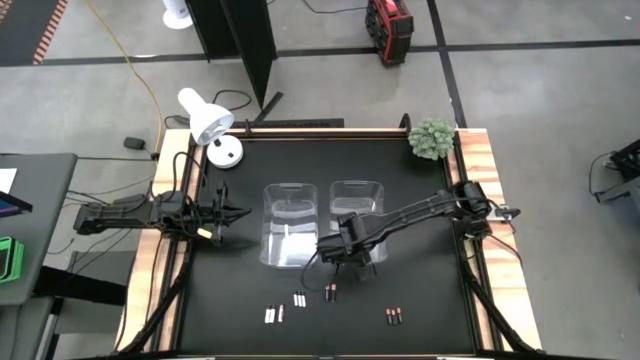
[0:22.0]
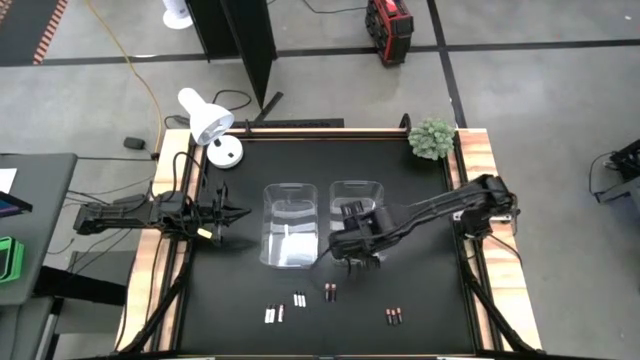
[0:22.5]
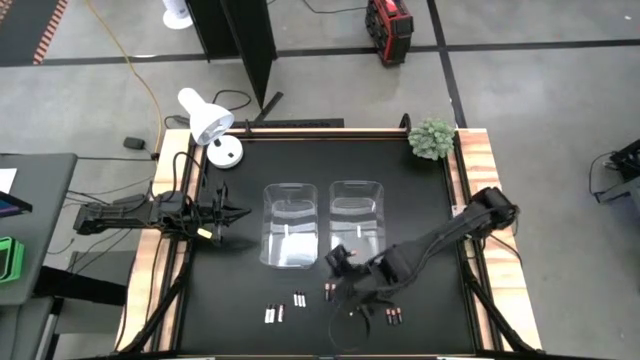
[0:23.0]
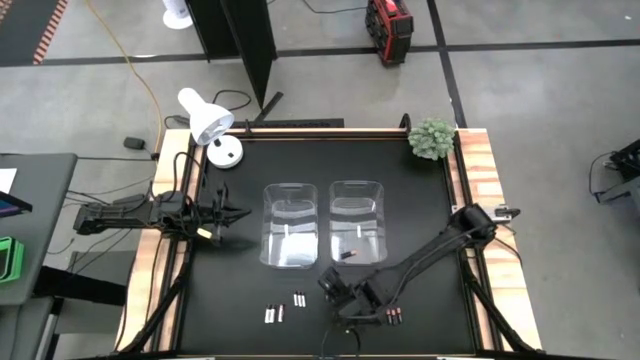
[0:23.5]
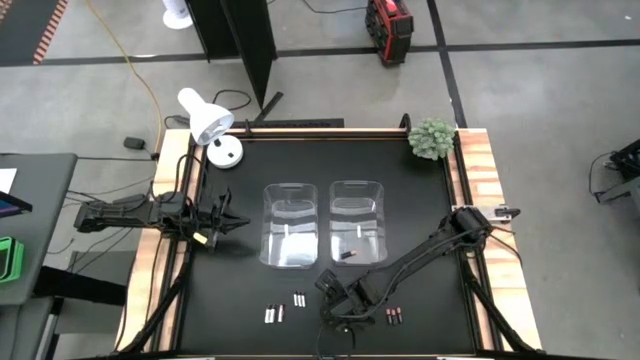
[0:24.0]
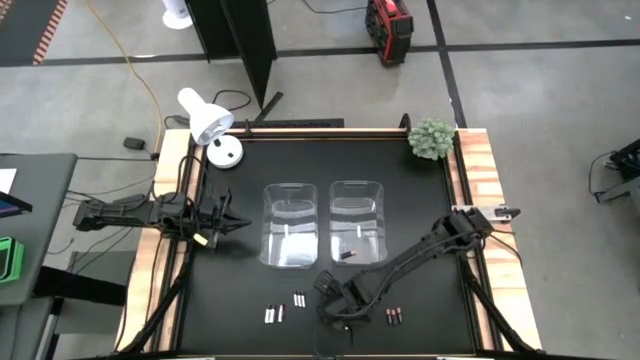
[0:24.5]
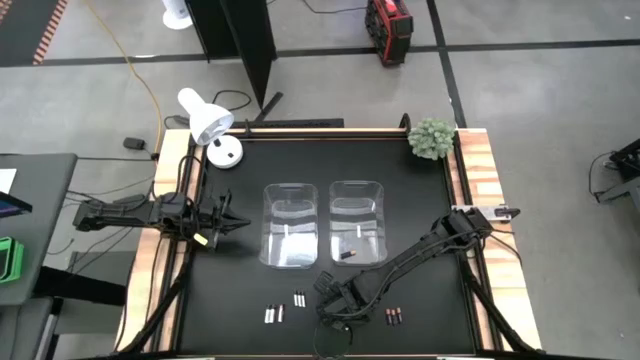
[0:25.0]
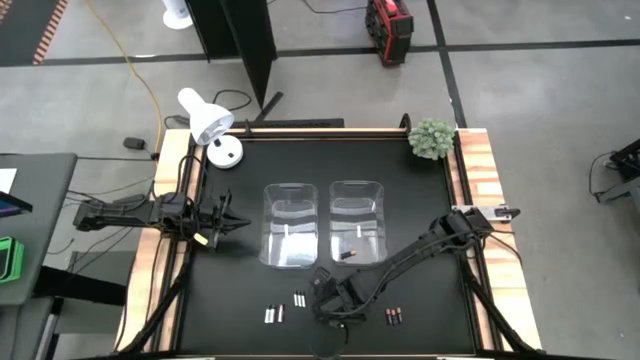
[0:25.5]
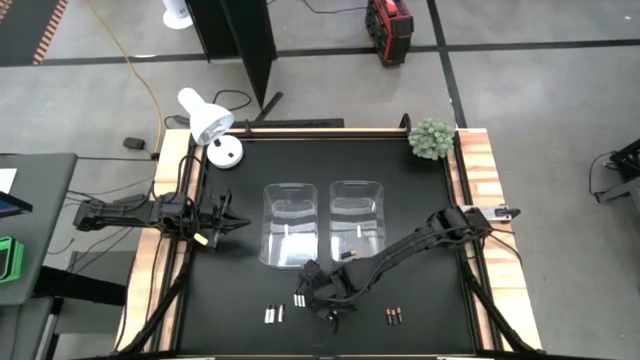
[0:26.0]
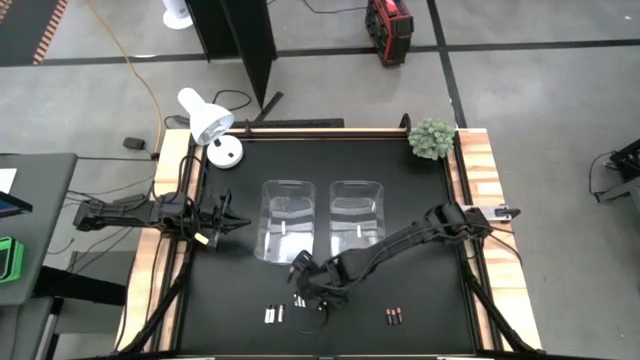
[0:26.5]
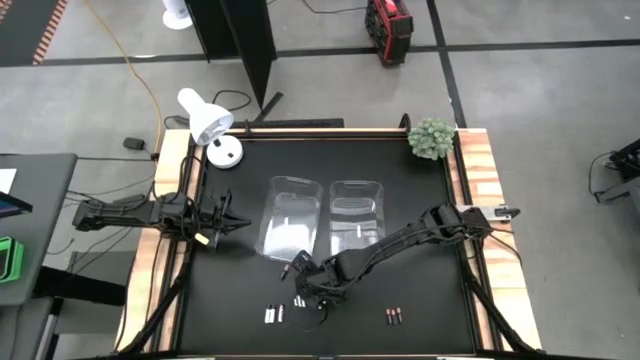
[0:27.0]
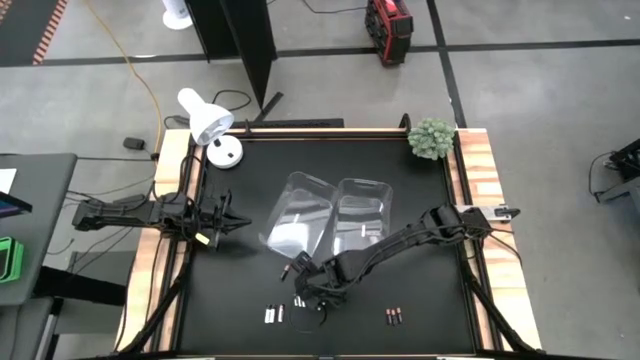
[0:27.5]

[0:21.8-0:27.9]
Task: Sort batteries
Put the black battery into the right transparent bin

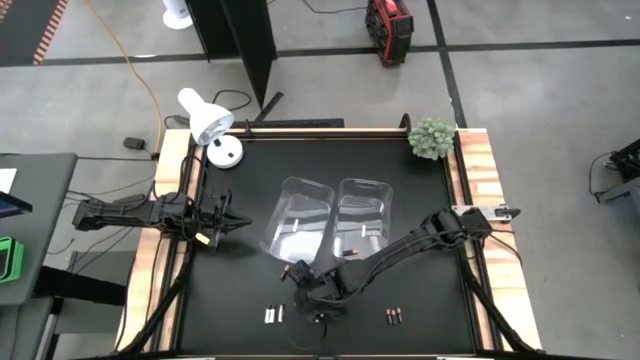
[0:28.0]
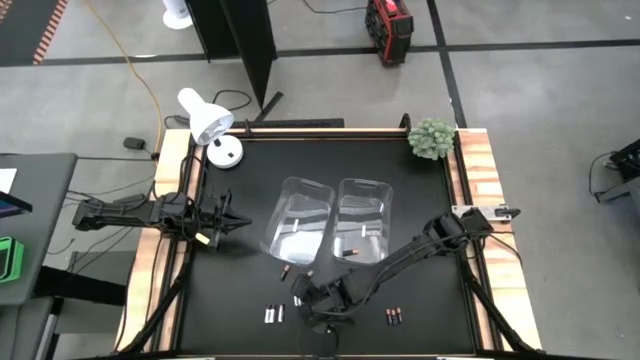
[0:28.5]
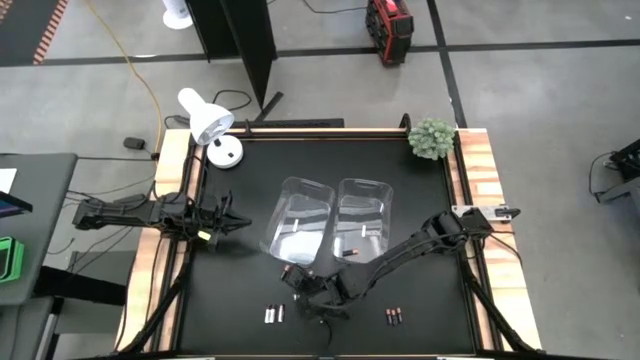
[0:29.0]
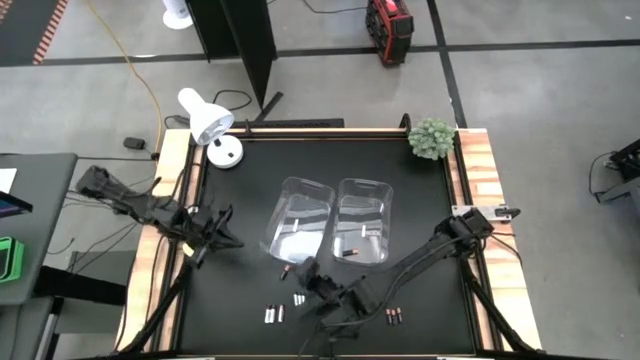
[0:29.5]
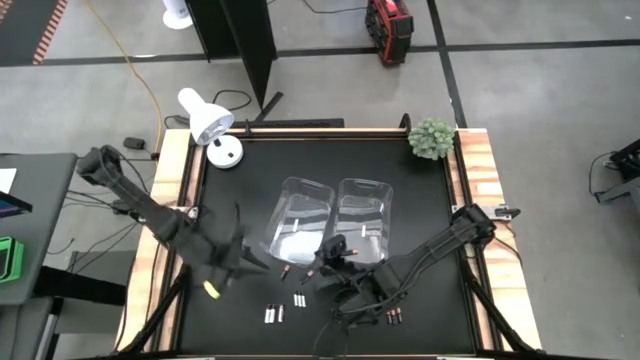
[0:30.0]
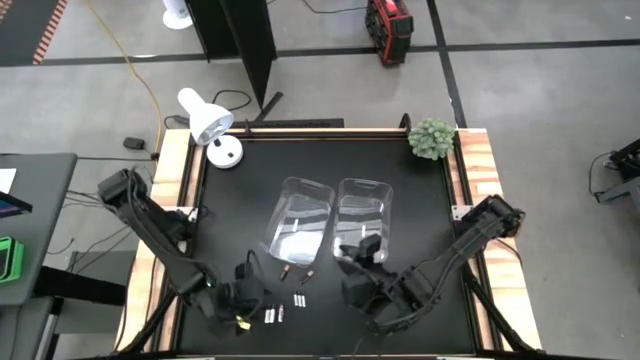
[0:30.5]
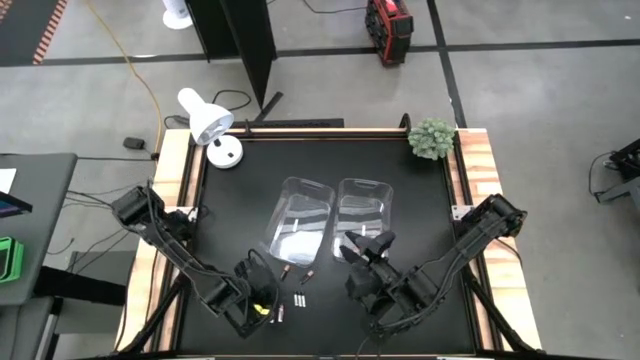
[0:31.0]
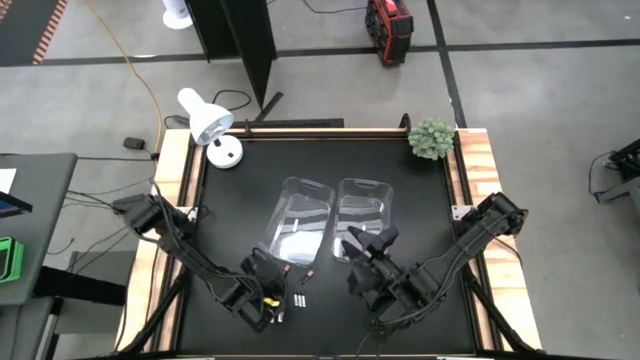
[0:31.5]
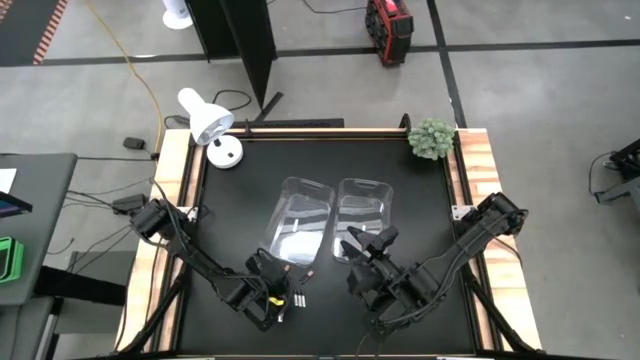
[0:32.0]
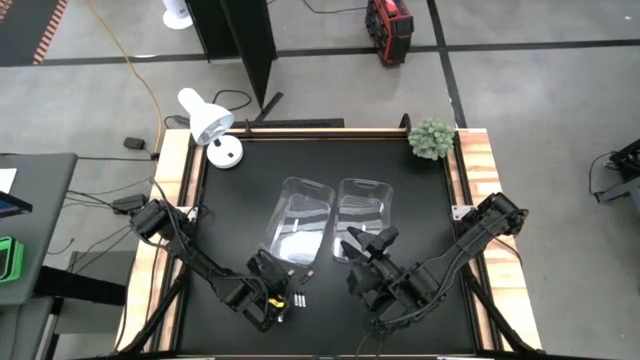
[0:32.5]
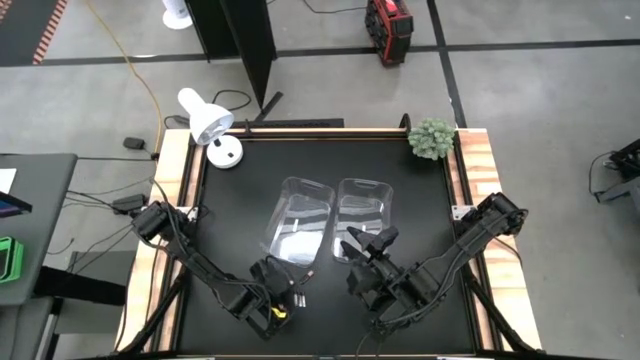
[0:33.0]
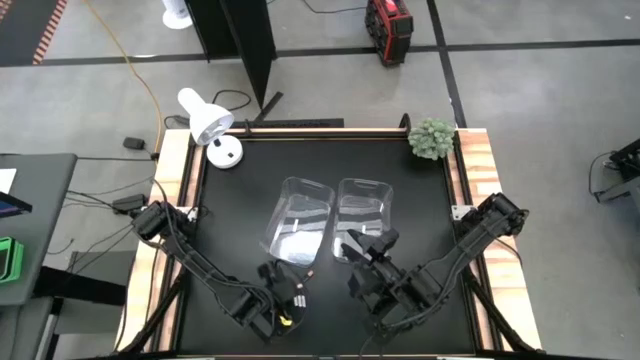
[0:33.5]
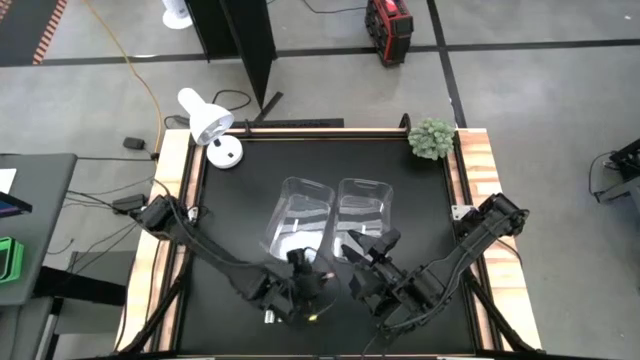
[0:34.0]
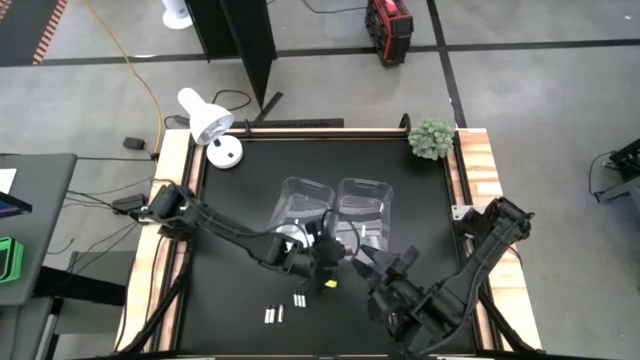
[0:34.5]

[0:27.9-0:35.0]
Put the black battery into the right transparent bin

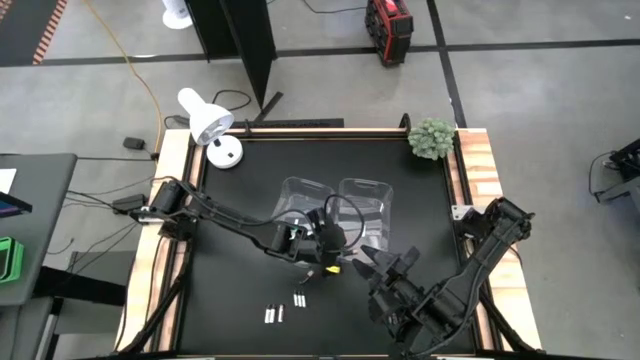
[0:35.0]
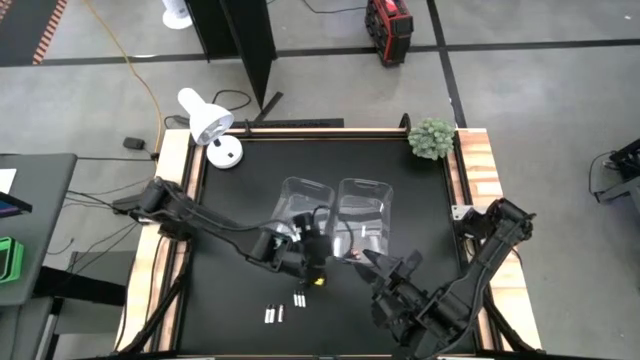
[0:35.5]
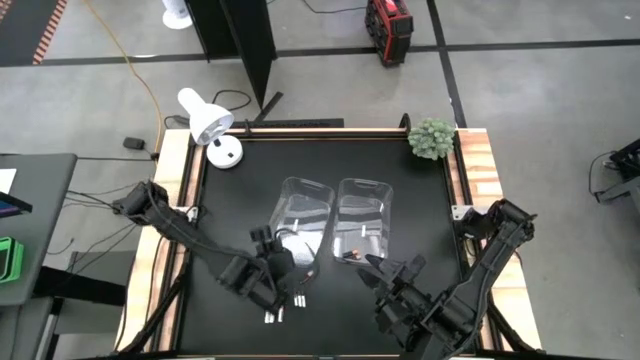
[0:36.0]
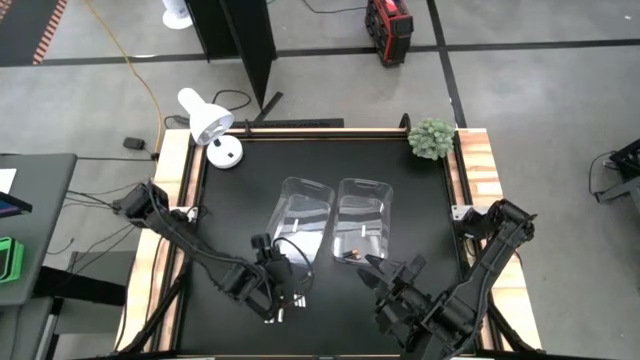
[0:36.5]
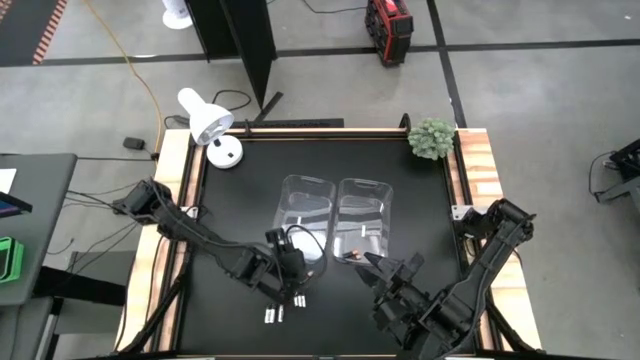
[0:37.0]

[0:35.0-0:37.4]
Adjust the left transparent bin on the table

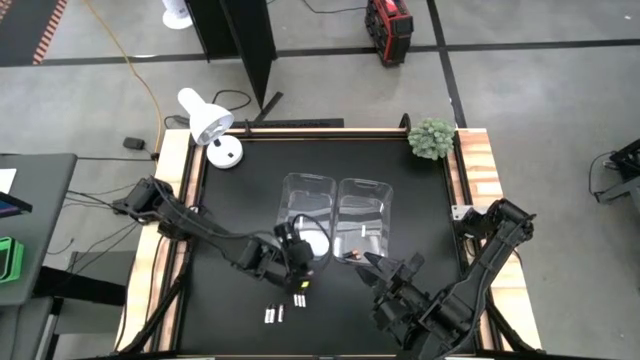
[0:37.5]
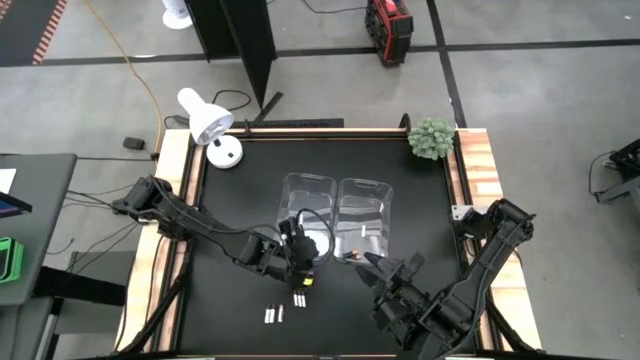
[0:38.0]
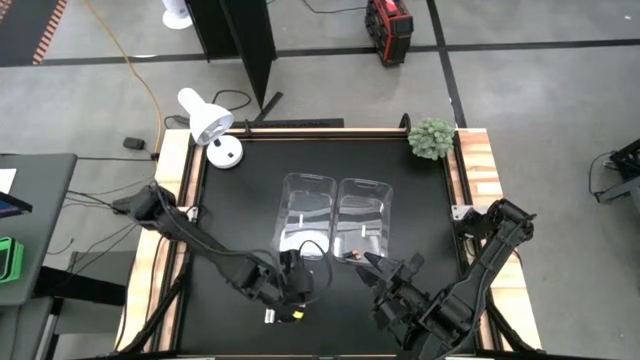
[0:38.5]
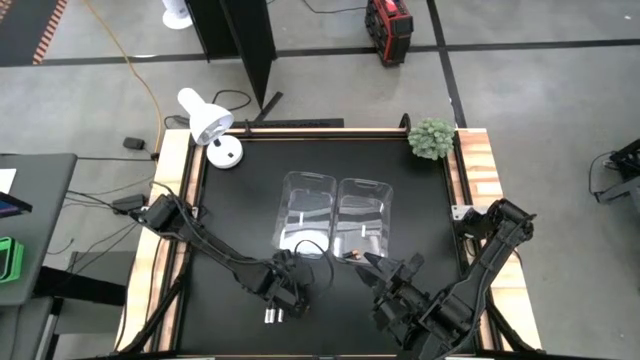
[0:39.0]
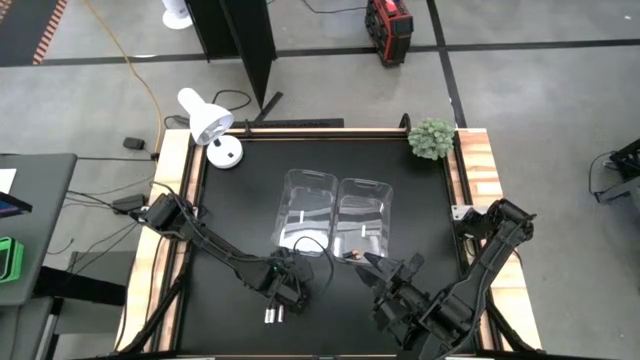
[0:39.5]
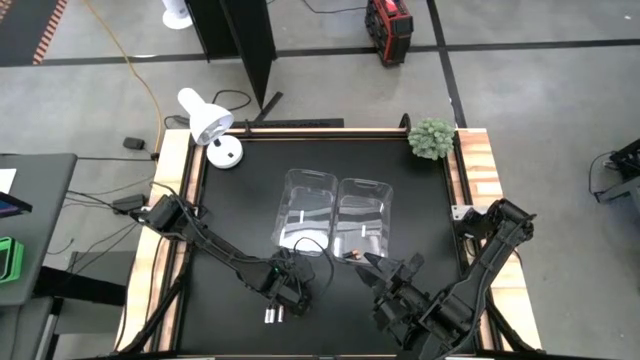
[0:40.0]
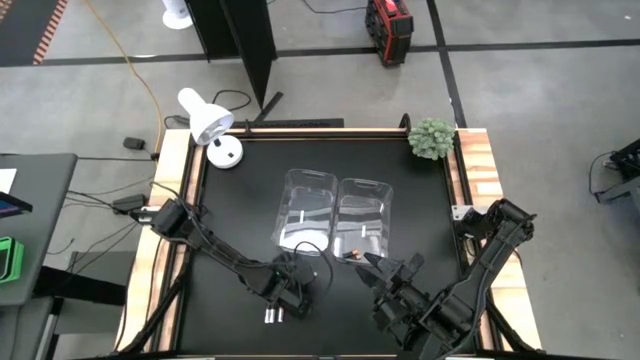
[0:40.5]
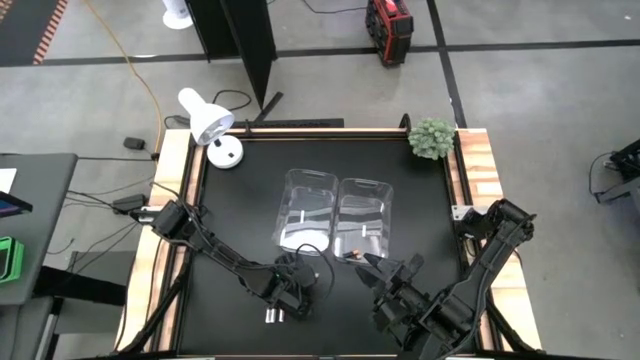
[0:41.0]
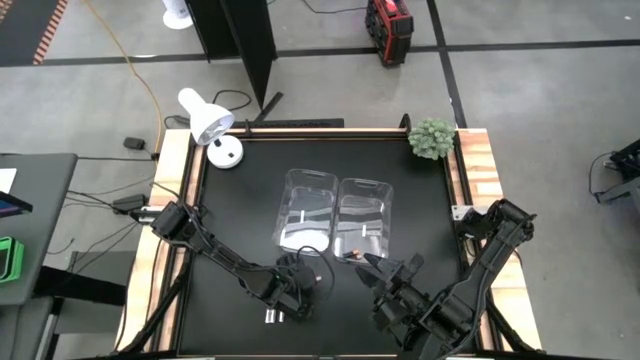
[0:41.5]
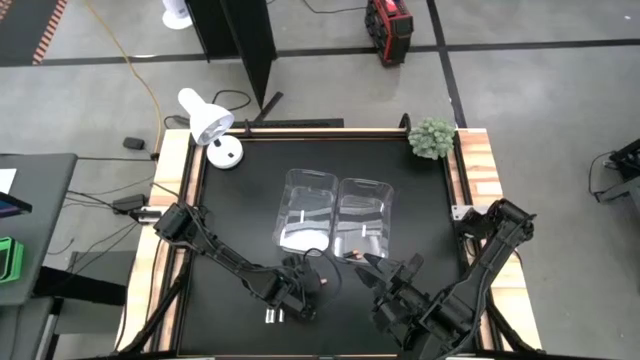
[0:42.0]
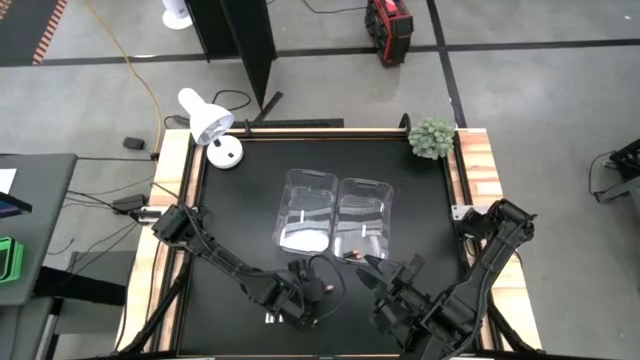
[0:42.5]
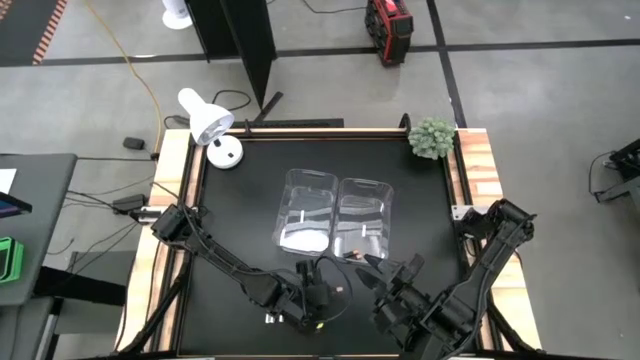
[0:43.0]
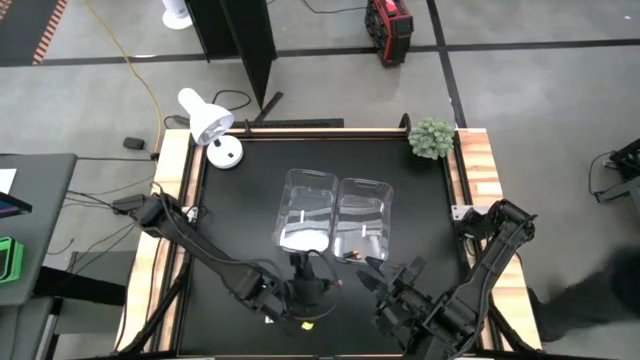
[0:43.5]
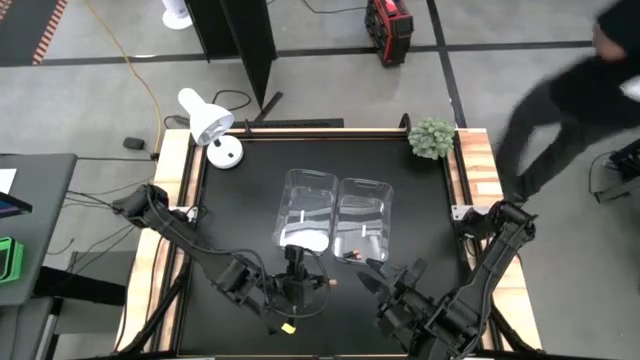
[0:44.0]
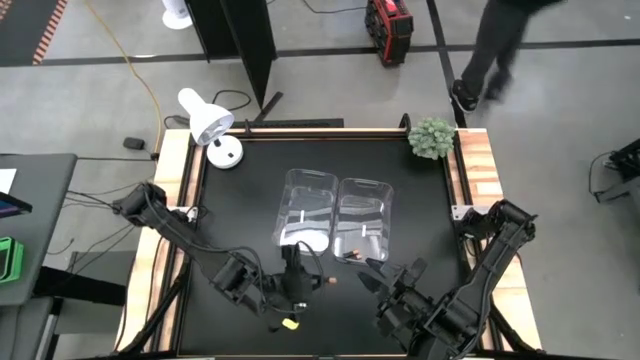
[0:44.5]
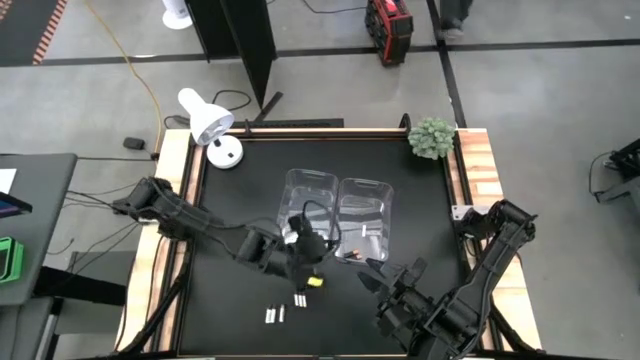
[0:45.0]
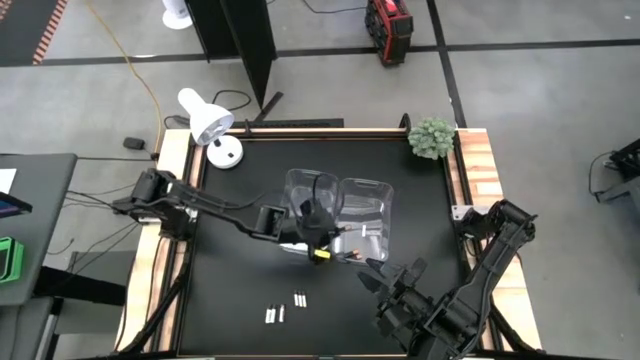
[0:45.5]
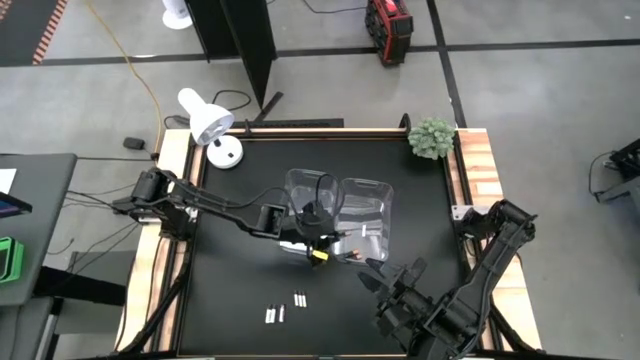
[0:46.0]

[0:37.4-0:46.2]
Put the black battery into the right transparent bin
